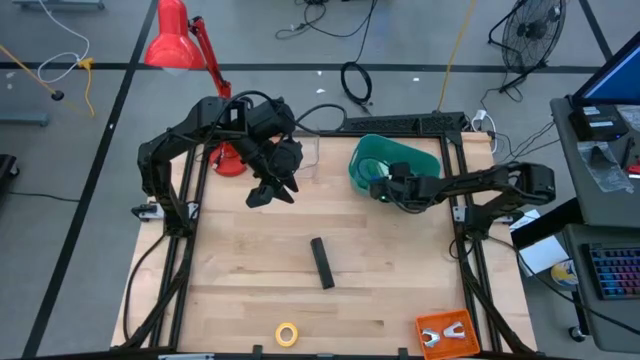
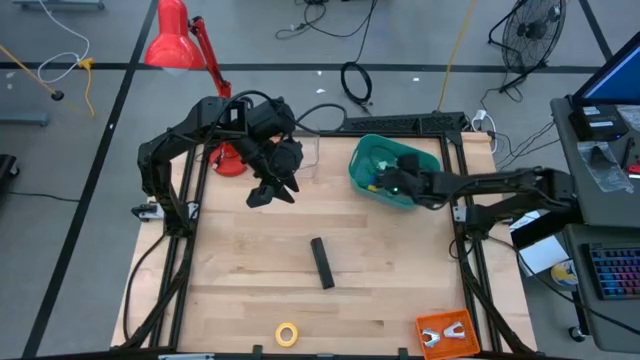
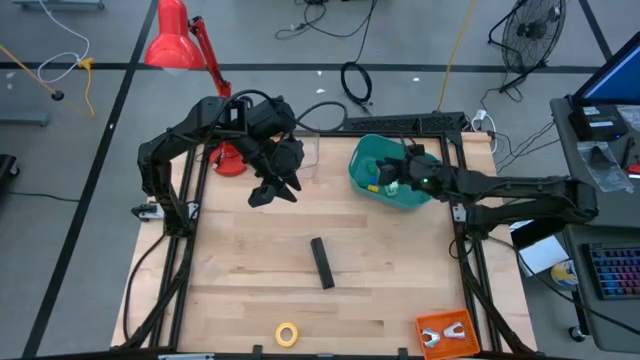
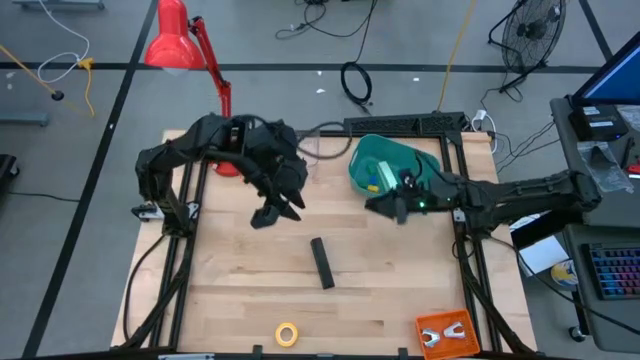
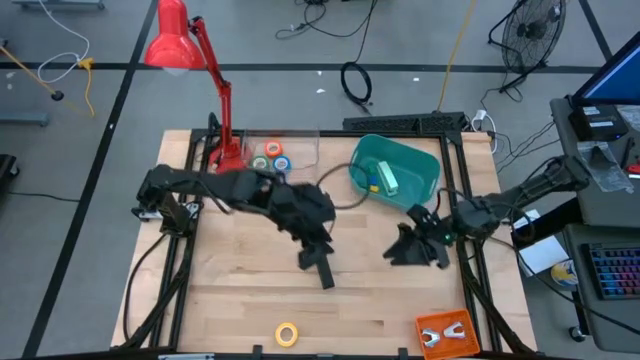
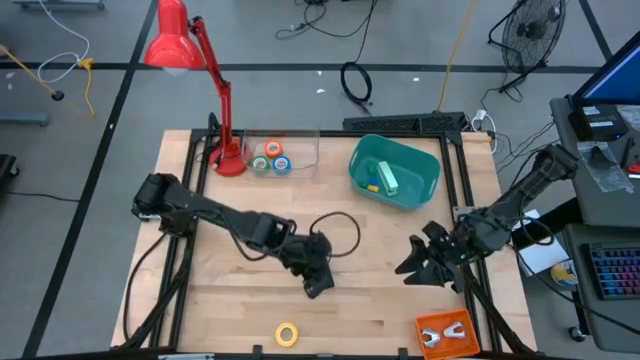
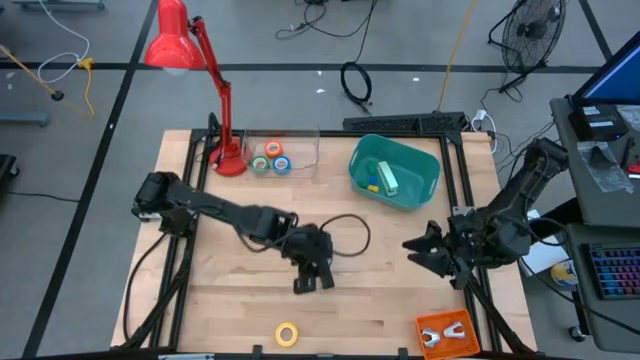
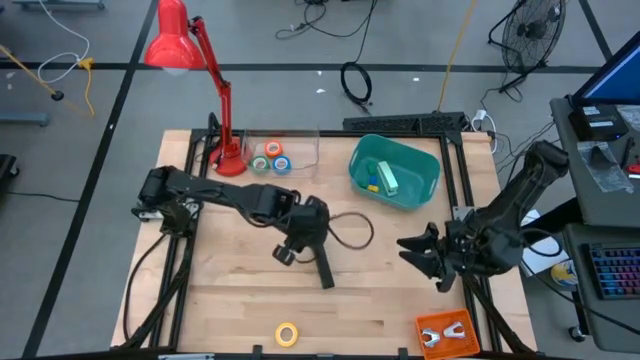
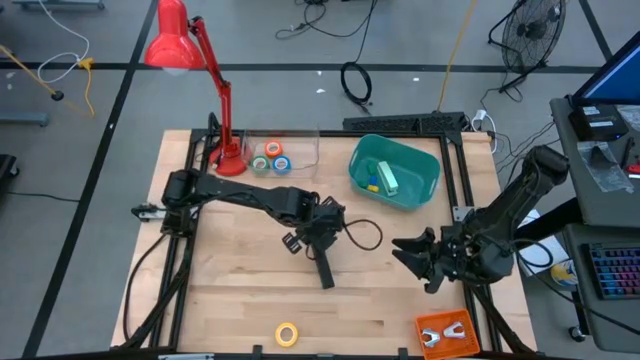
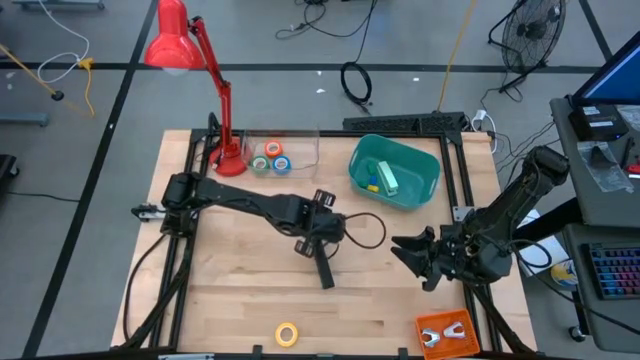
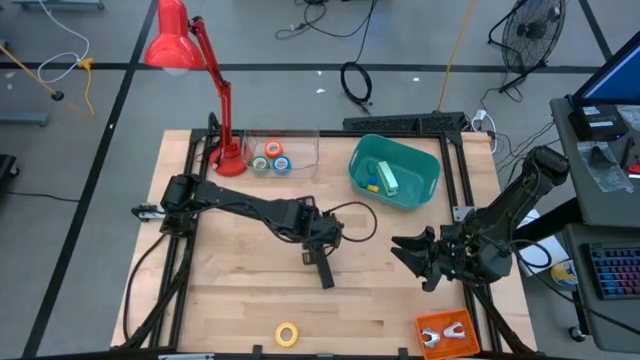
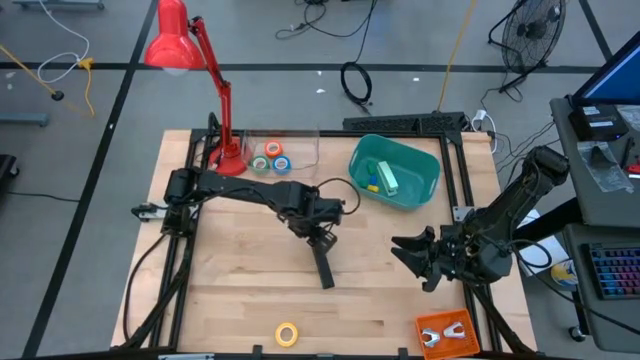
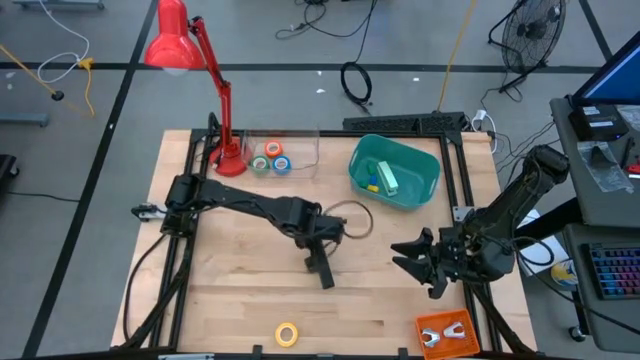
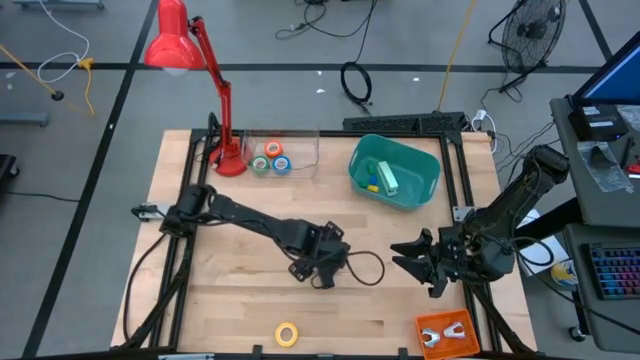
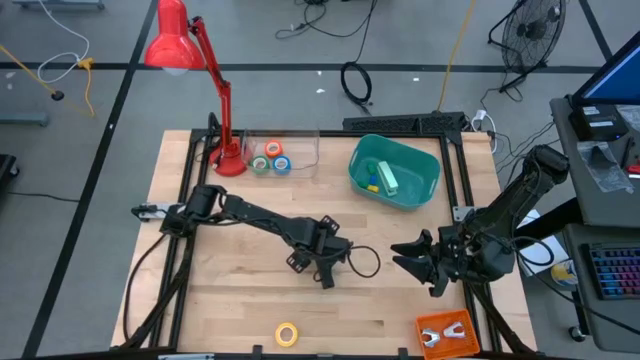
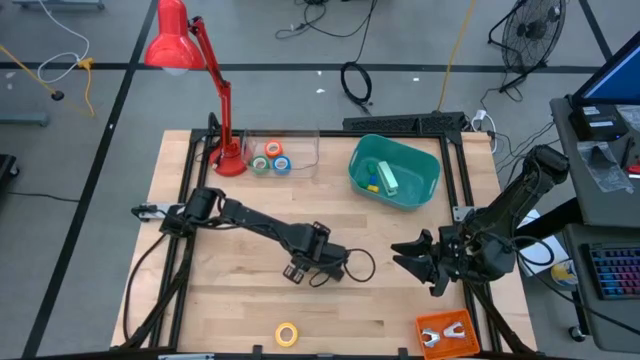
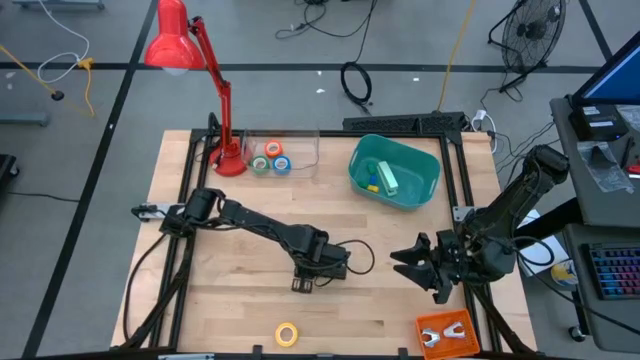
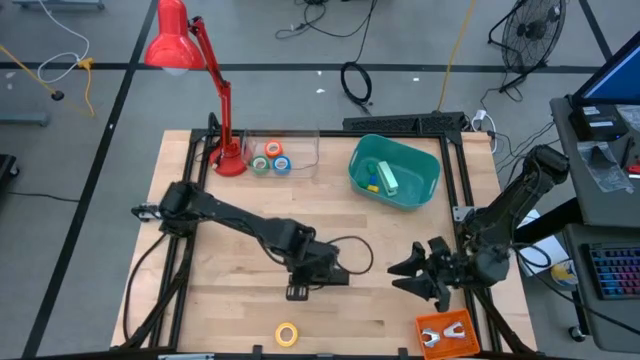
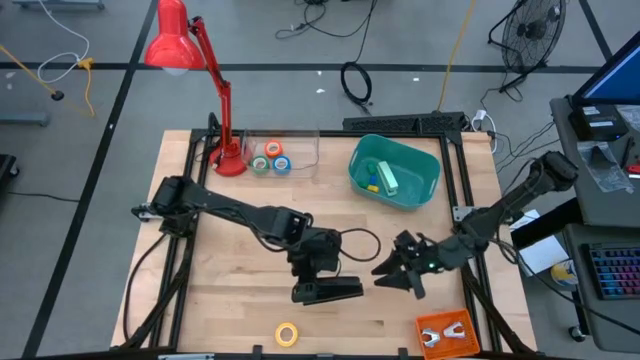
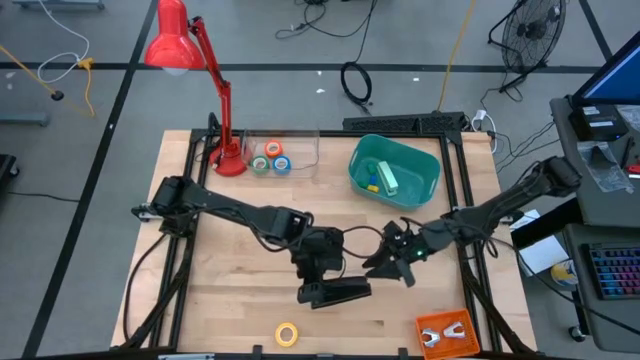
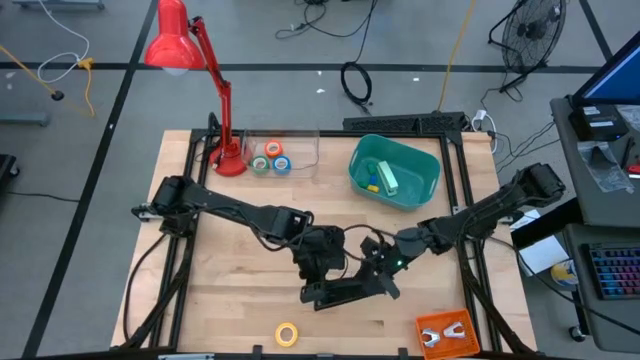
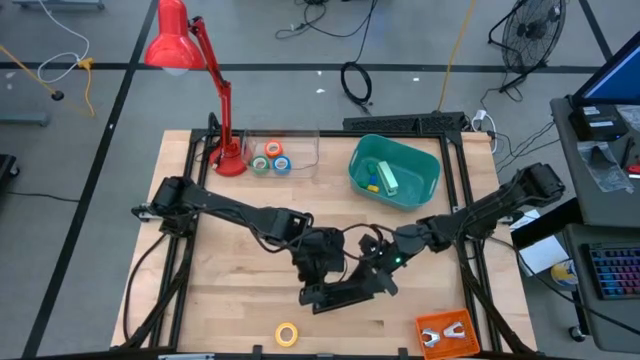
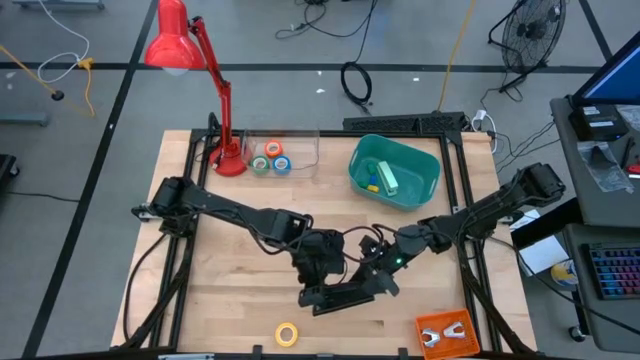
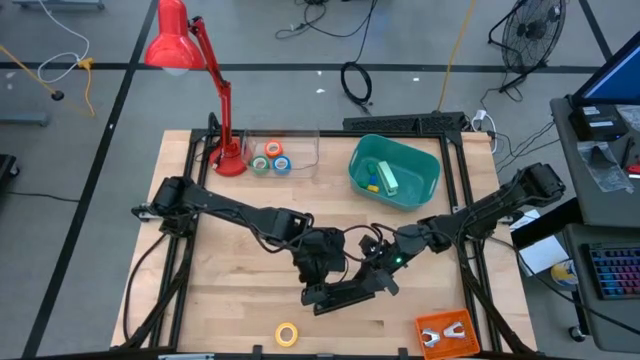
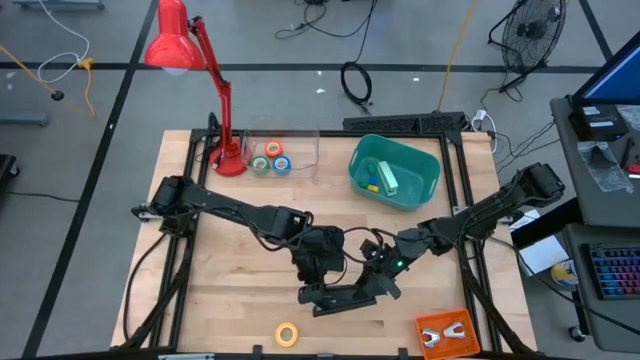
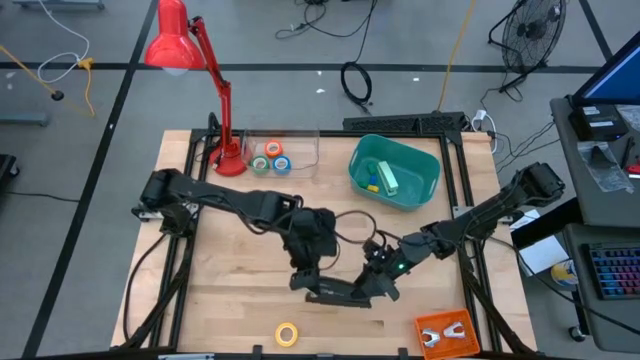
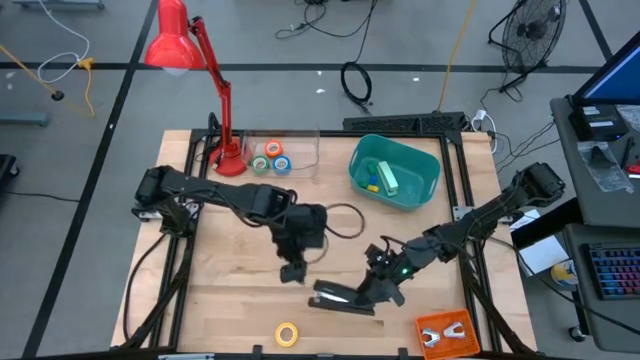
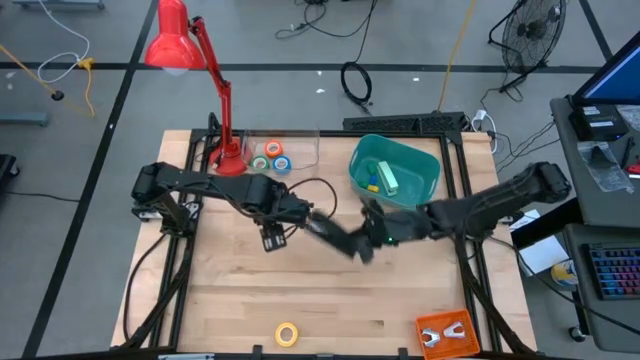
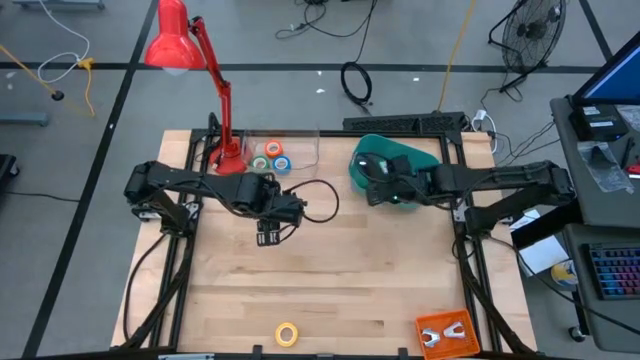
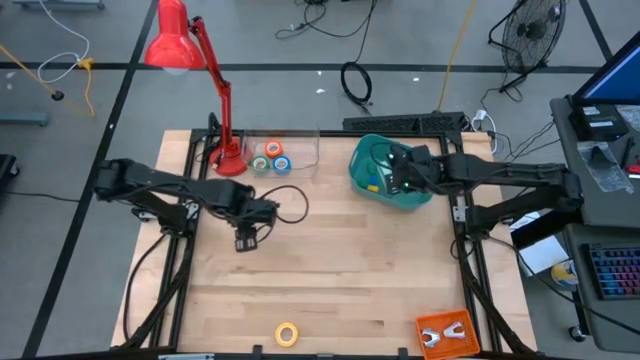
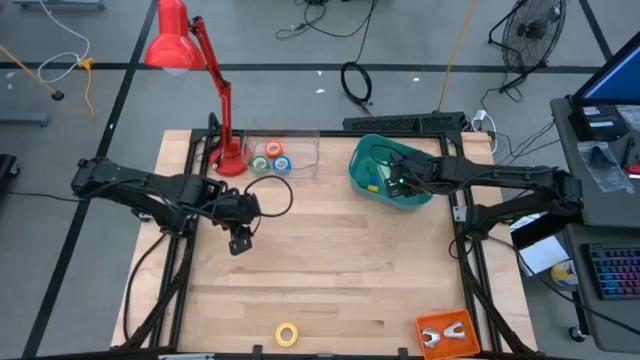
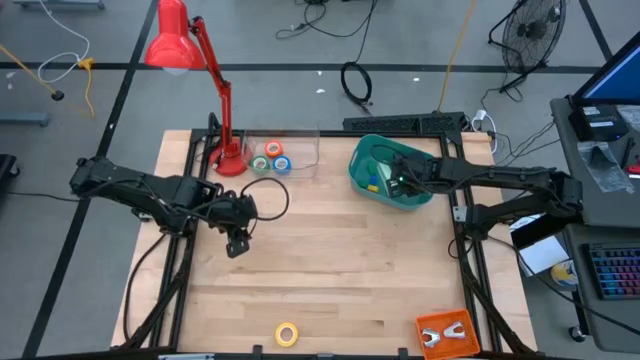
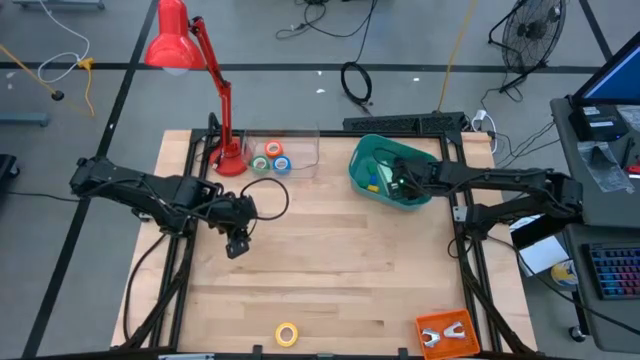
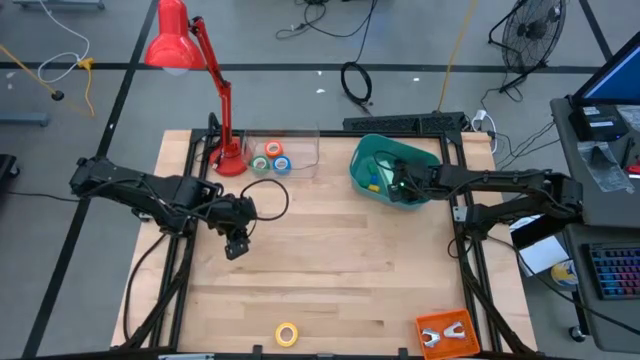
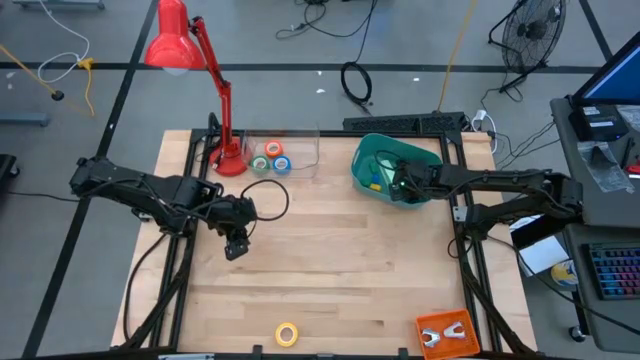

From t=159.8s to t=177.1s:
Task: Pick and place Stapler, Stapler remover, tape
Put the black stapler into the green bin

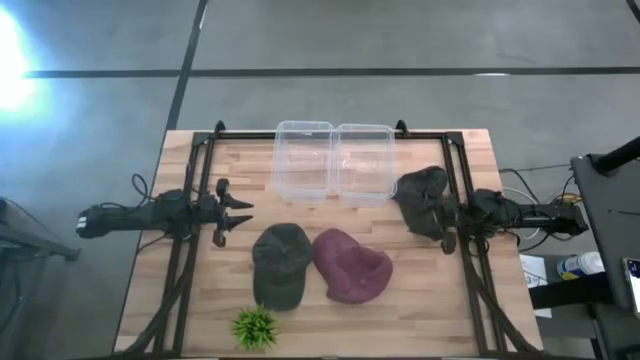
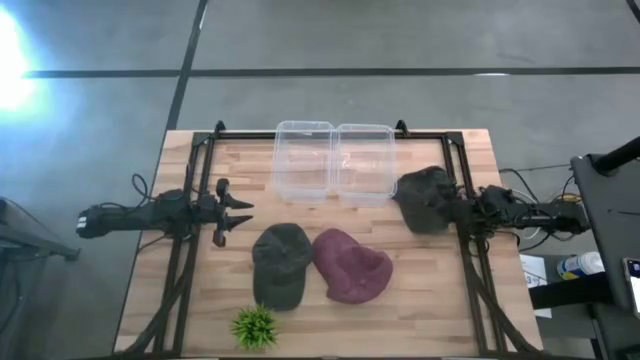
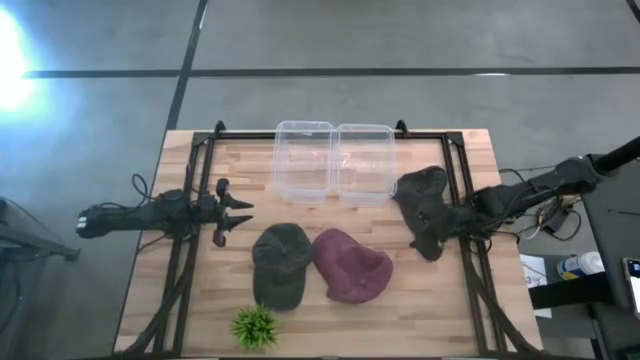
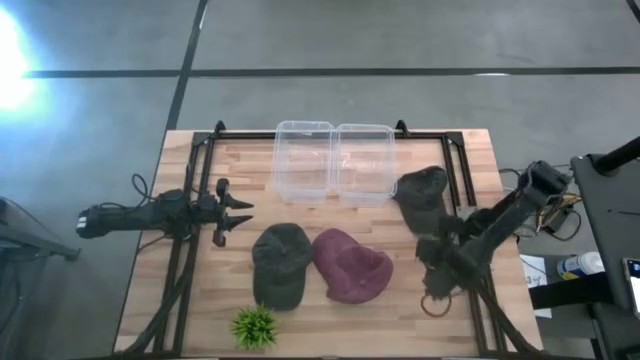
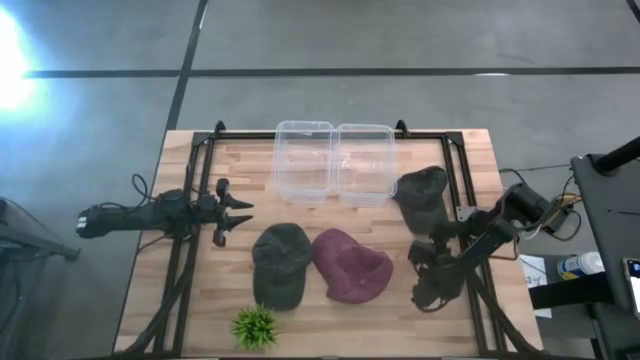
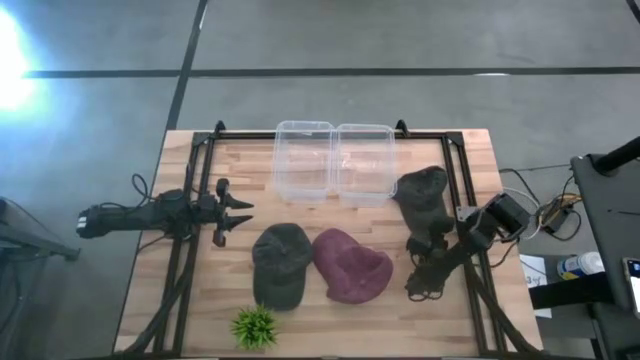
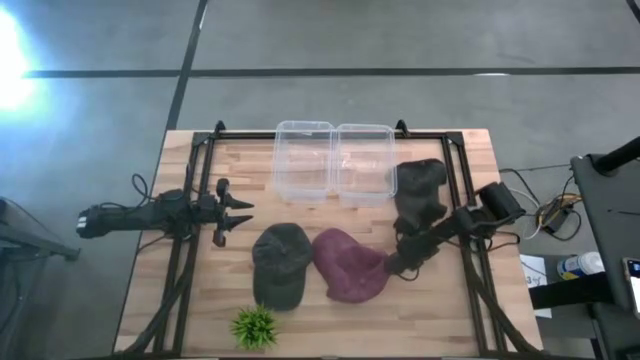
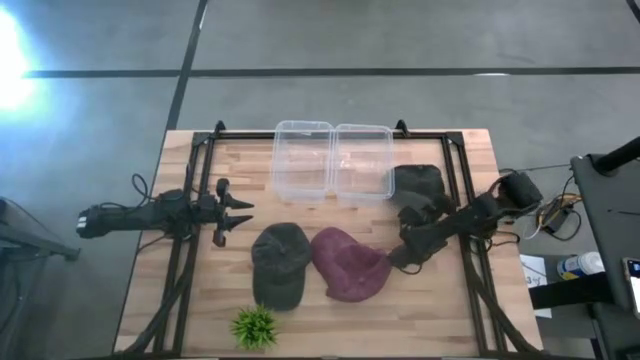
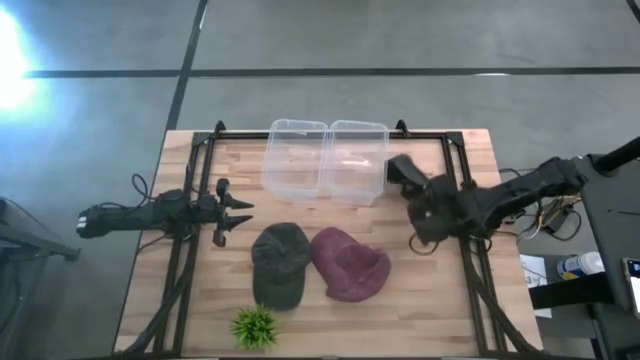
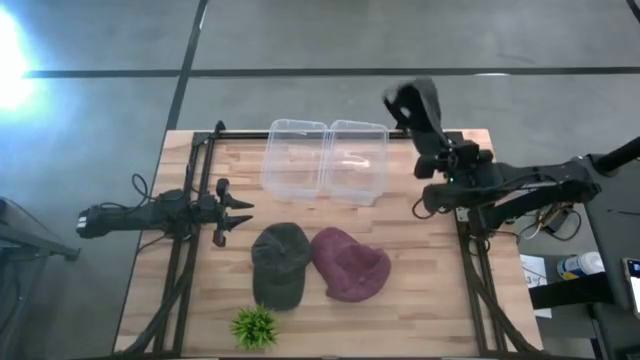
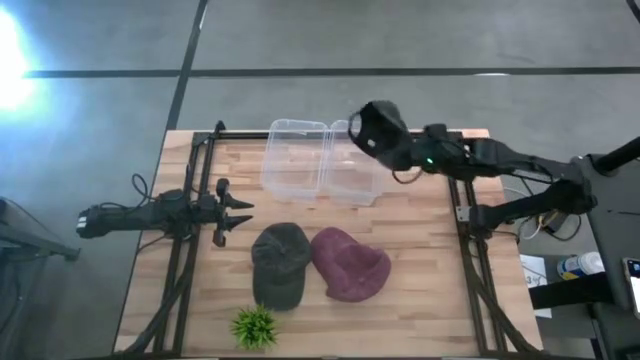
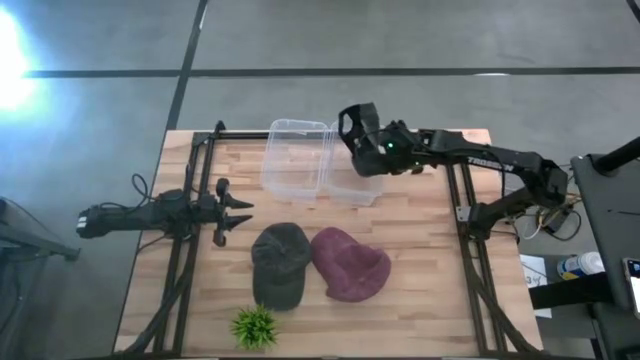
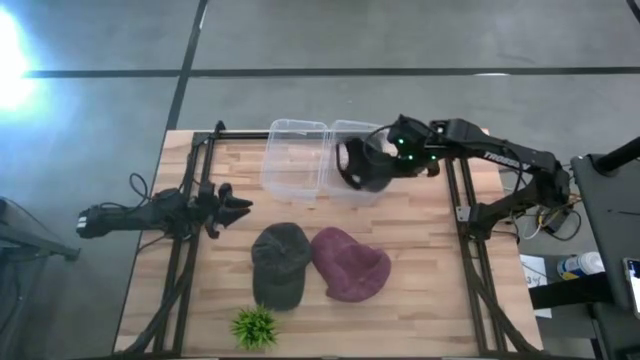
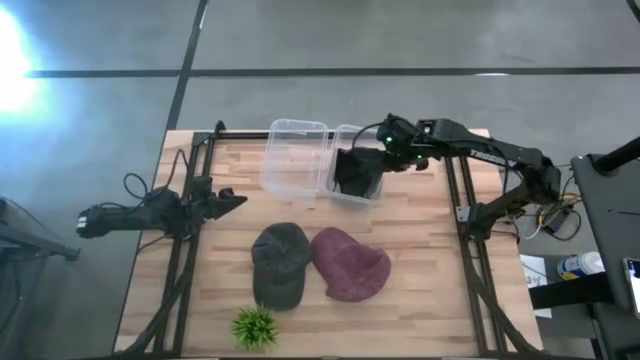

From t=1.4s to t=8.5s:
Task: Pick and place caps into container
Put the top black cap into the right transparent container
